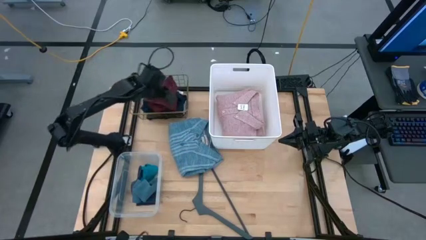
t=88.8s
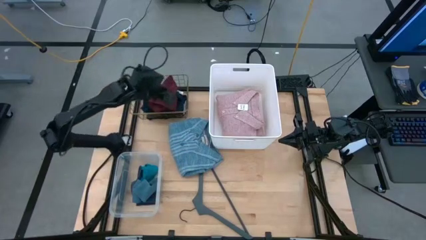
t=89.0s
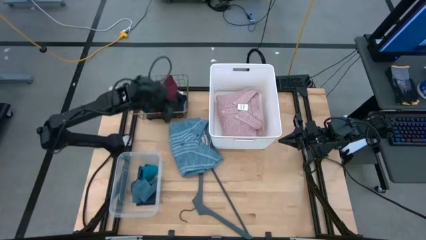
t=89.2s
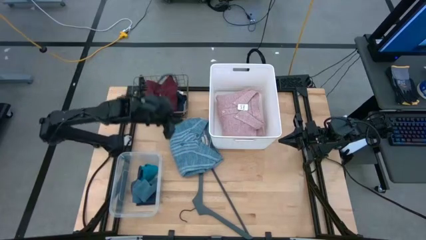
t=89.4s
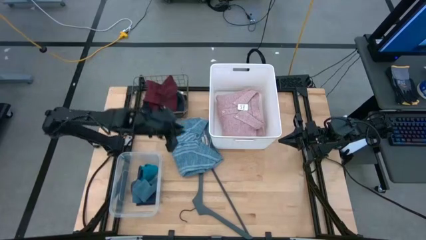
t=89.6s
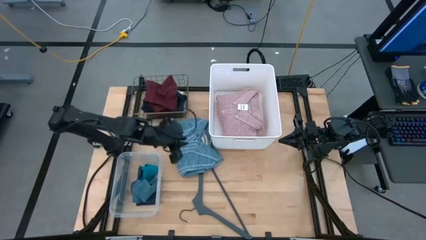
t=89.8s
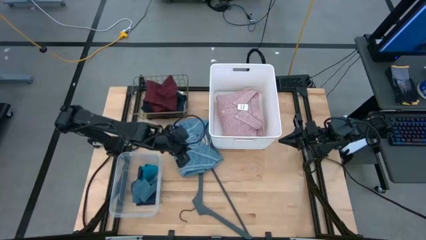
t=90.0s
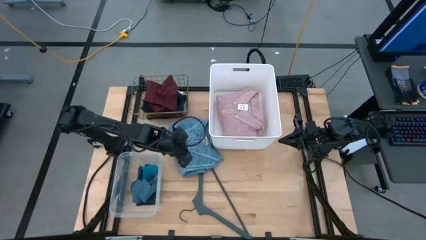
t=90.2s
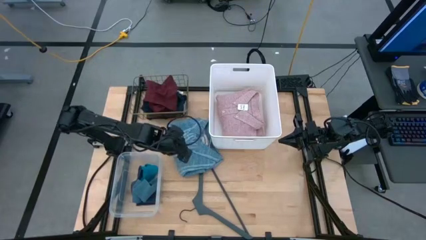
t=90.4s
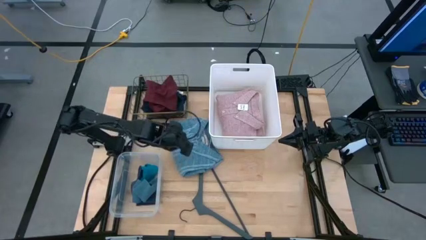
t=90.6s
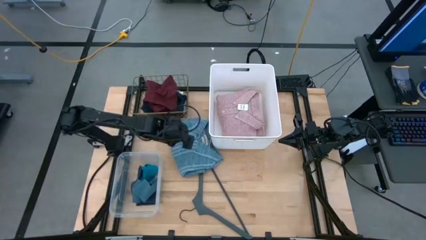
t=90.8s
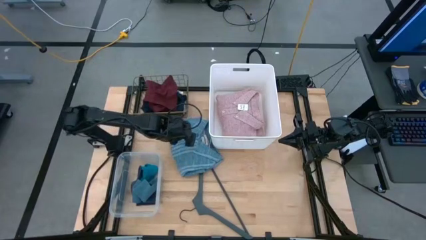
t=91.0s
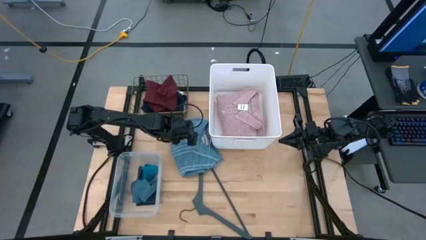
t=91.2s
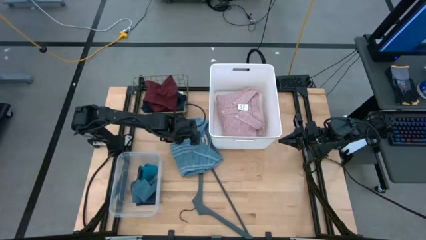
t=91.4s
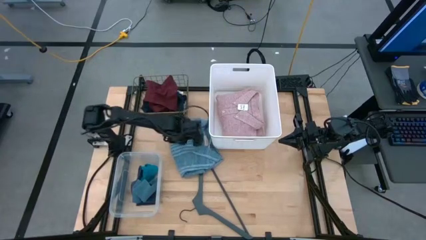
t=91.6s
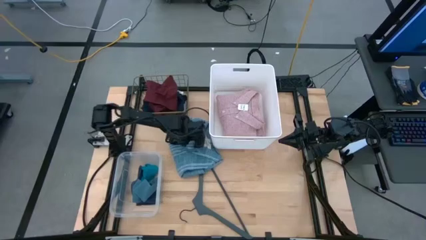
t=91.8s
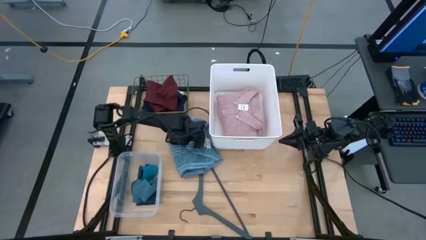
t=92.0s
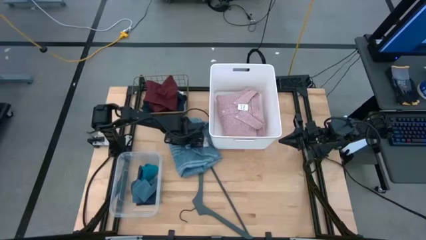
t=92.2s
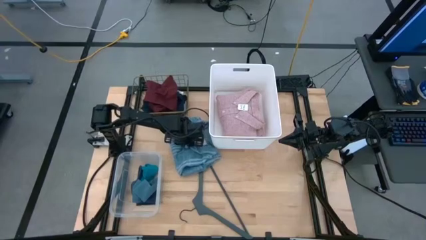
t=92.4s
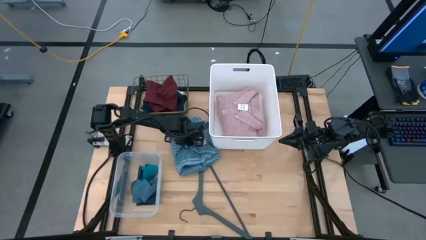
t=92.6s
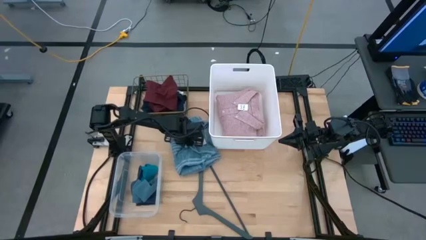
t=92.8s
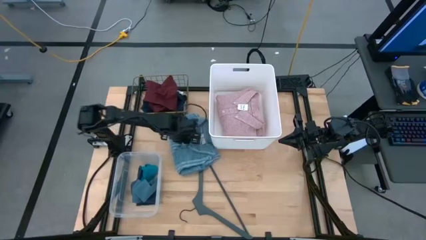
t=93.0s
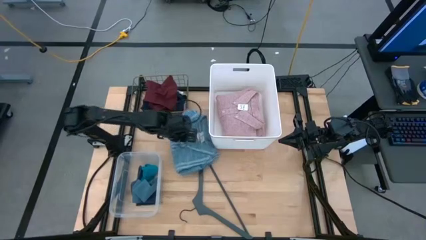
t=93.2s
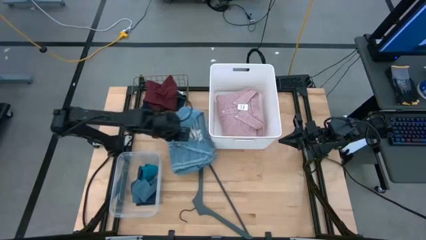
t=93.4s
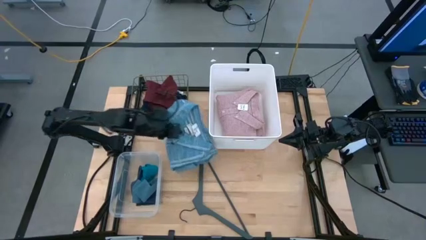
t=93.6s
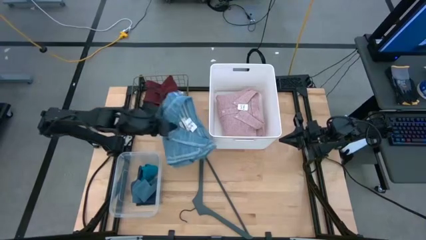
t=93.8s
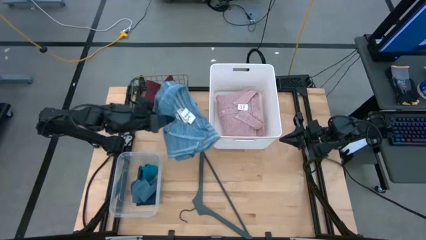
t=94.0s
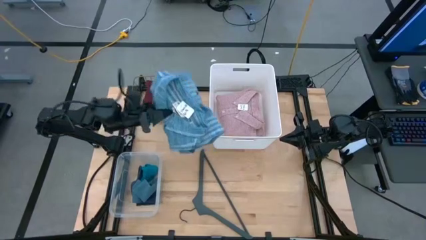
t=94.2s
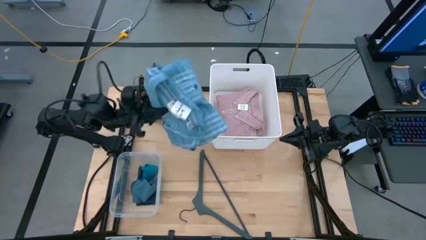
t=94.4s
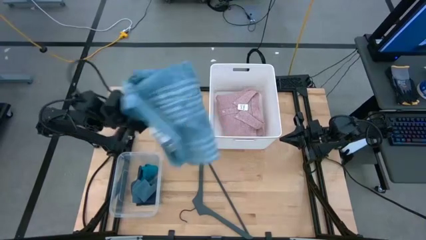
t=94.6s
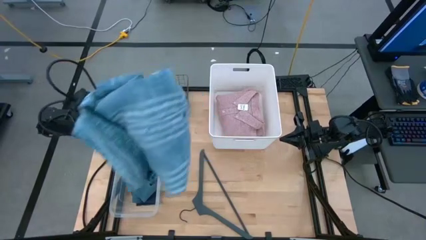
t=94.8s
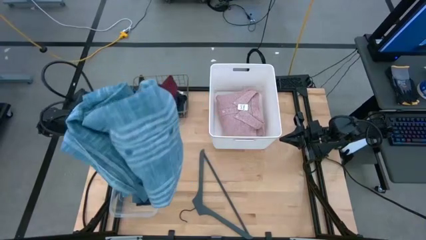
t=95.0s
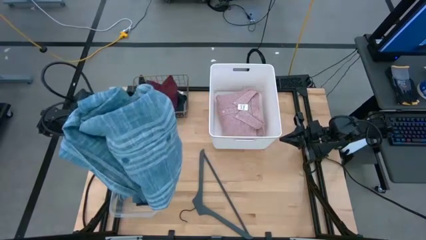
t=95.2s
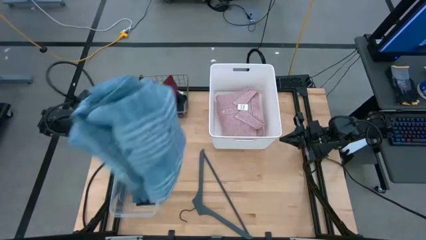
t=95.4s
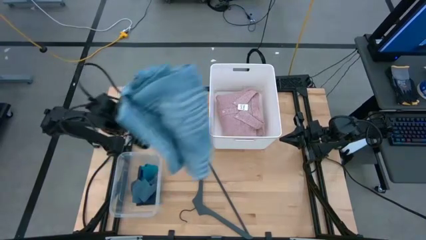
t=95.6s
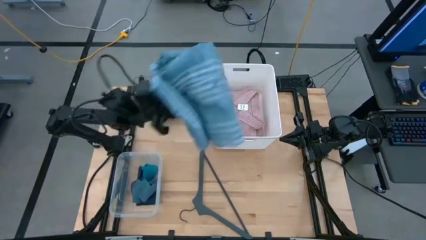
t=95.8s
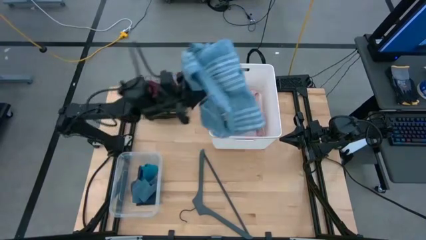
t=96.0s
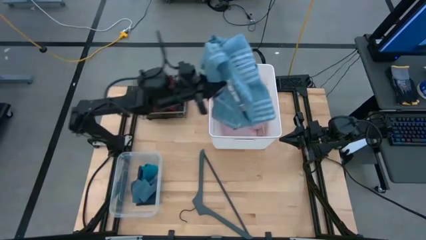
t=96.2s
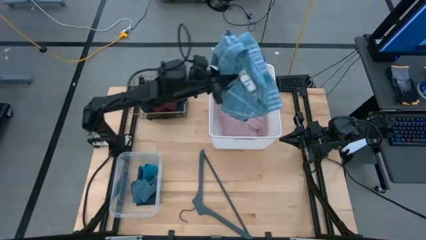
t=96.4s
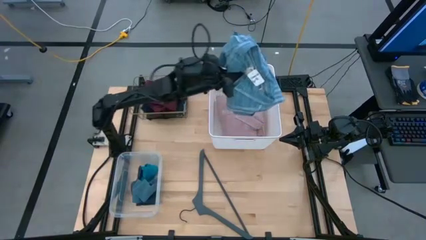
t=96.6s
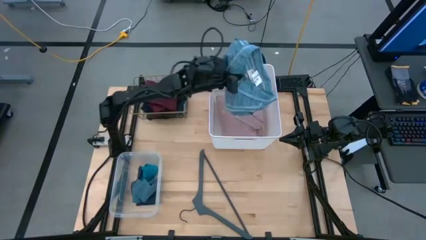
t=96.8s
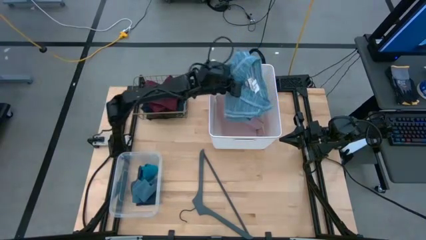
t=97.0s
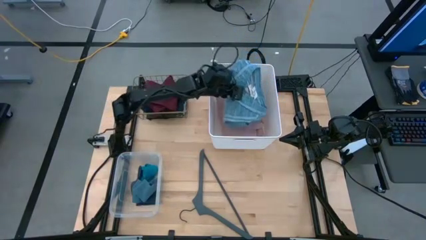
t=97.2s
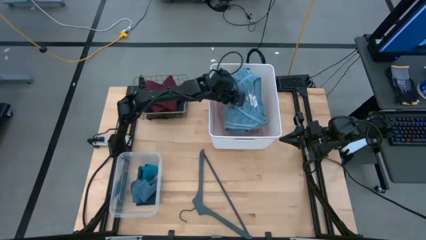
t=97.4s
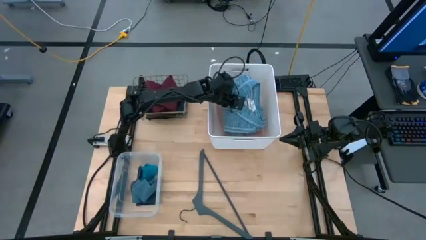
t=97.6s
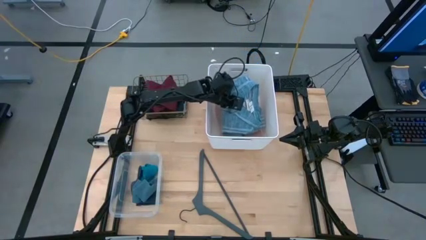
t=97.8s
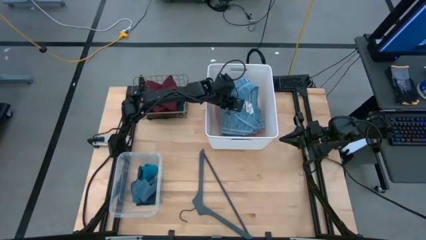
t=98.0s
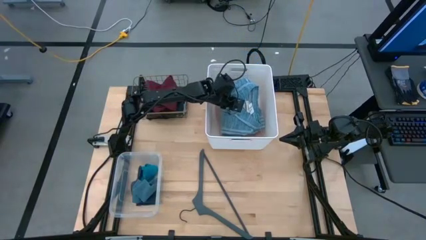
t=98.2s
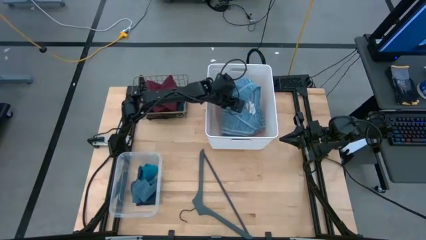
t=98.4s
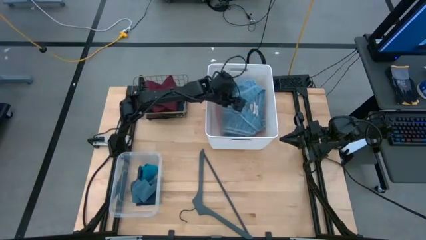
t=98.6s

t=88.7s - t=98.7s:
Task: Pick & Place Cloths
Put the blue shirt into the white bin

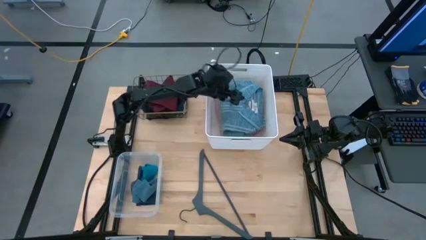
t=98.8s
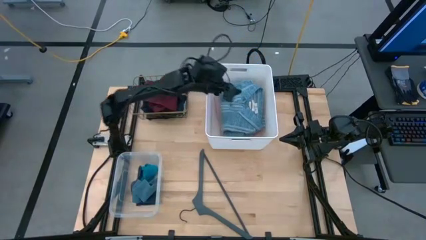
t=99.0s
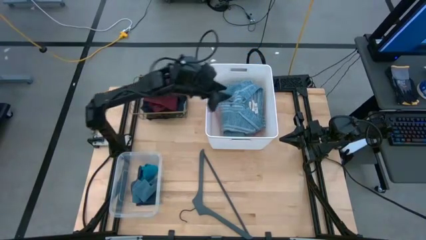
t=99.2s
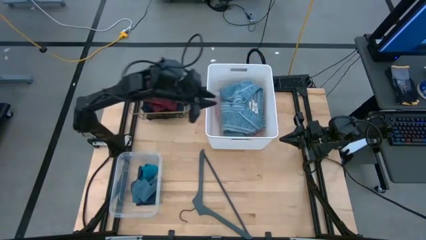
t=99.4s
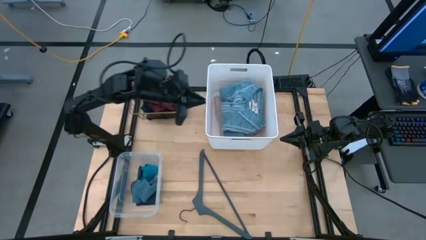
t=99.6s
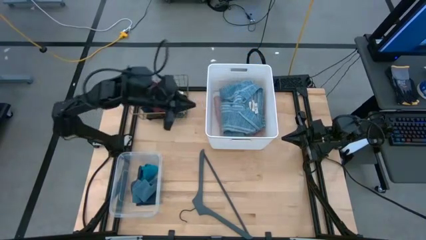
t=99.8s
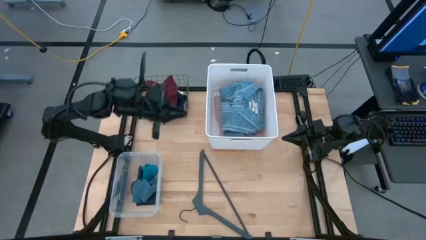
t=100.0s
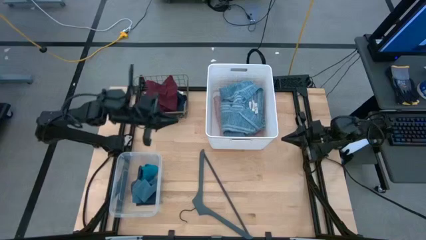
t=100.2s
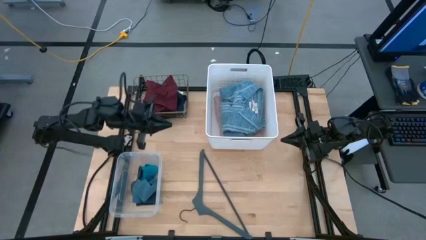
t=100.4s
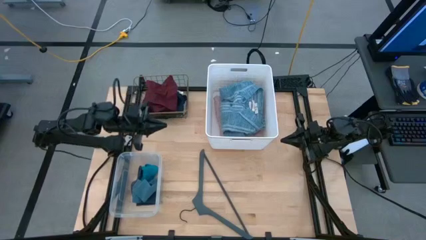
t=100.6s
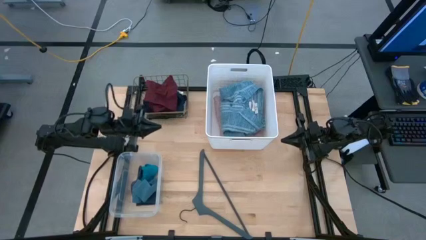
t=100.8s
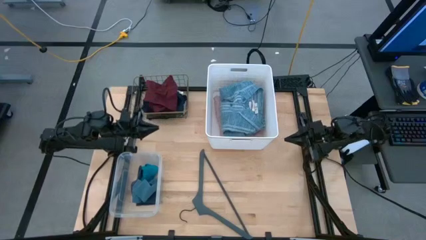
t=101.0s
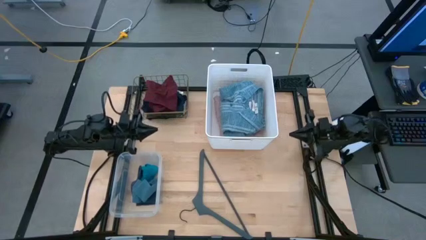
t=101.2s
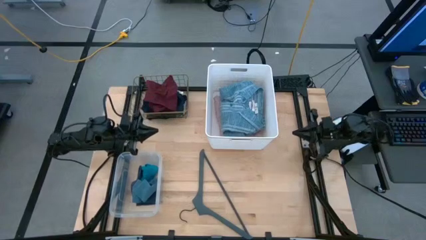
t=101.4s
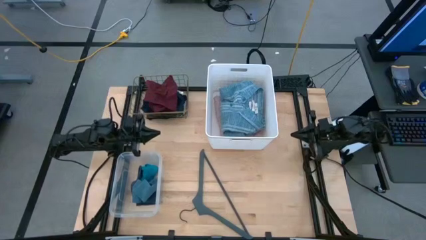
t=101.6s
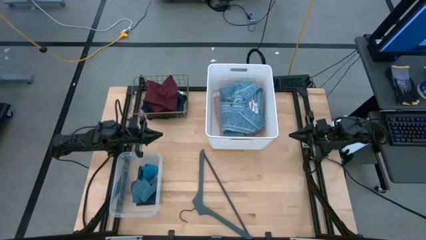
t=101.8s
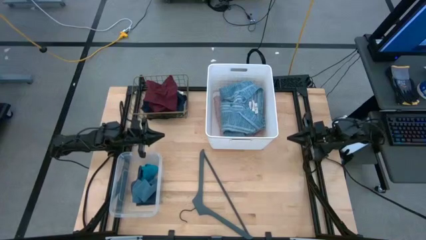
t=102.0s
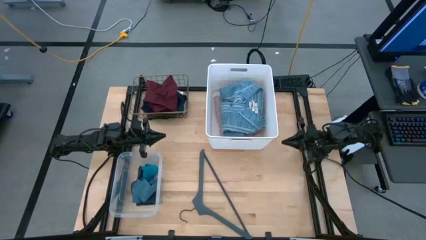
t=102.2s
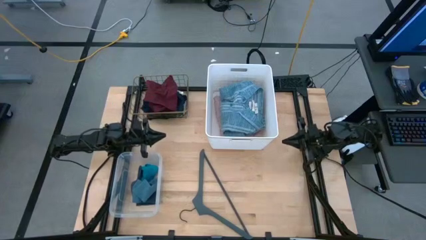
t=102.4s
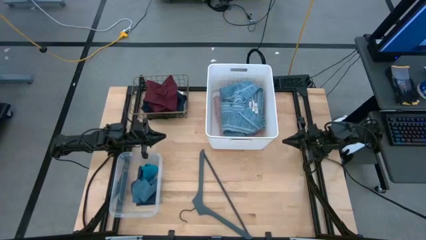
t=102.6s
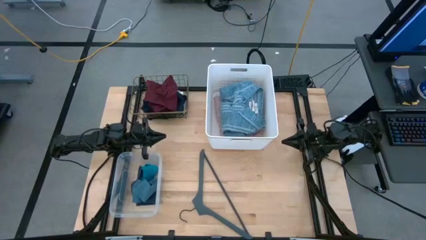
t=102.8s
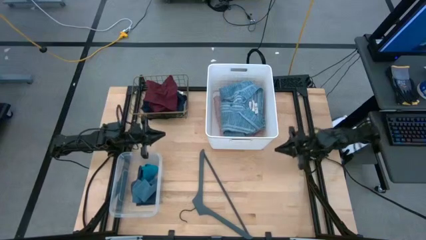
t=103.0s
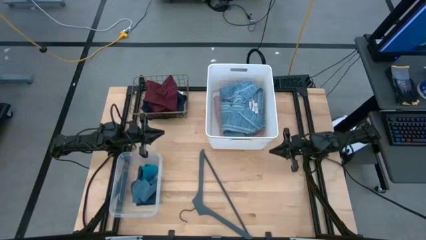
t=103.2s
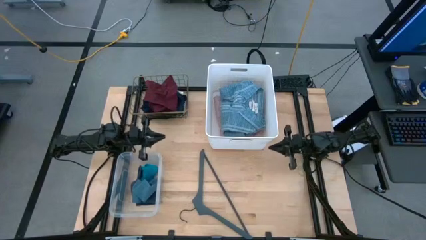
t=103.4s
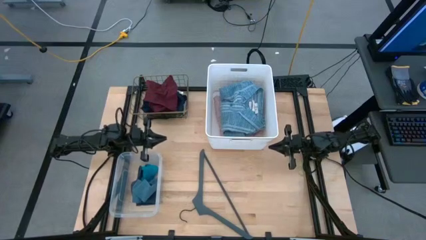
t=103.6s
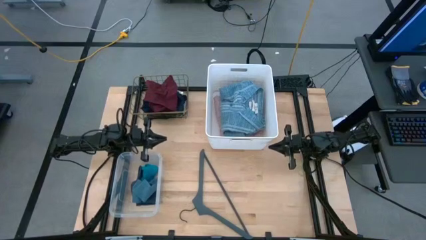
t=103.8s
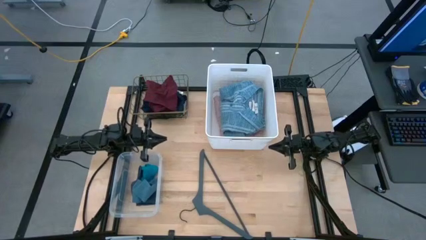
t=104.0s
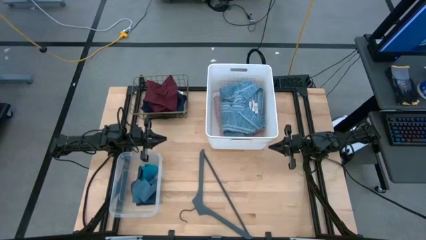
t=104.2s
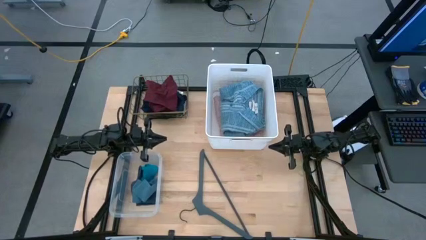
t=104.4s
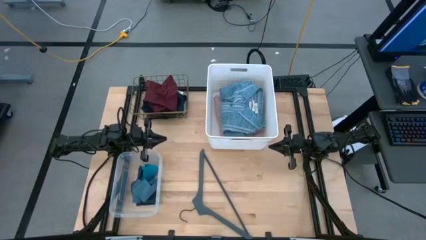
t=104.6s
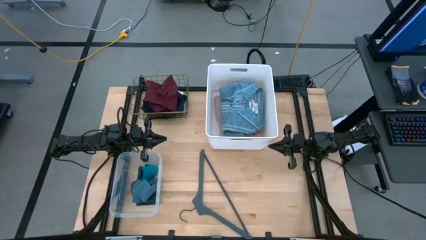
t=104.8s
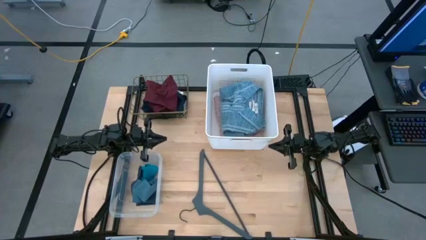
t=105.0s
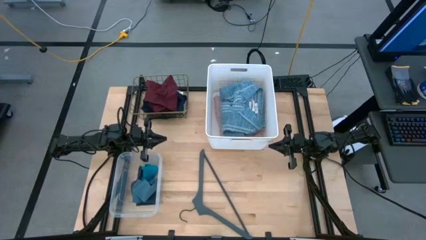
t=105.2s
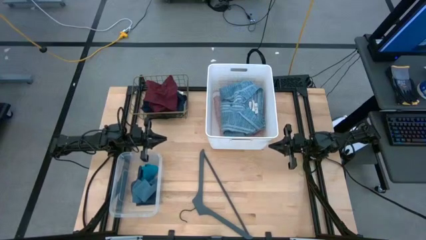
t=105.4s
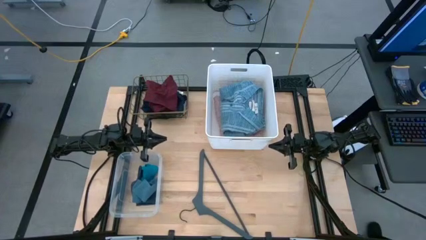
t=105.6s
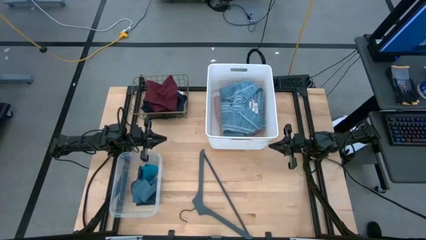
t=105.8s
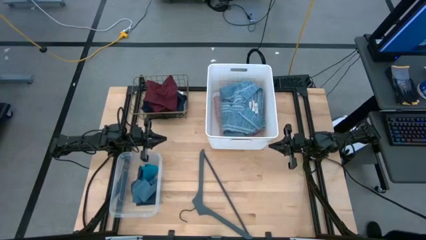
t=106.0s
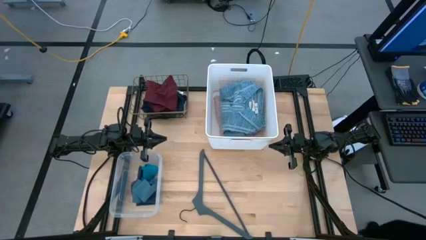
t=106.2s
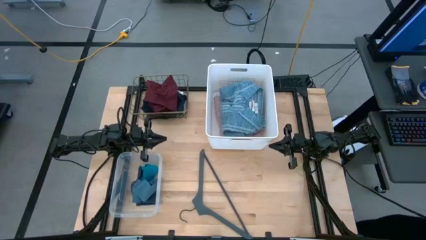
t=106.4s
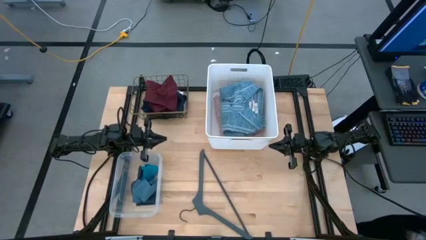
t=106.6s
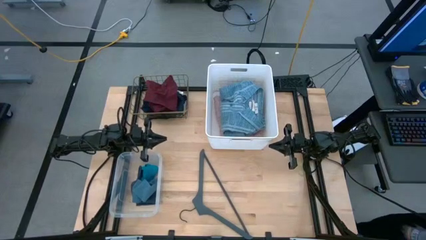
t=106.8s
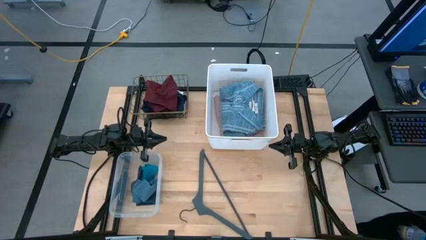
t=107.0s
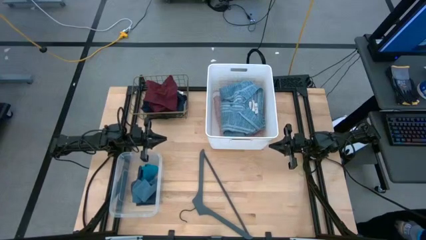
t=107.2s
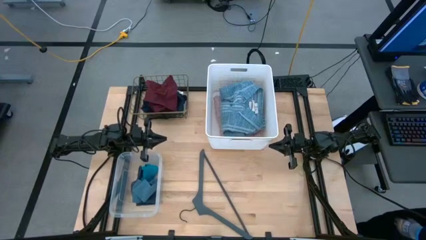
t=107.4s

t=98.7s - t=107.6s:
Return to Home Position
